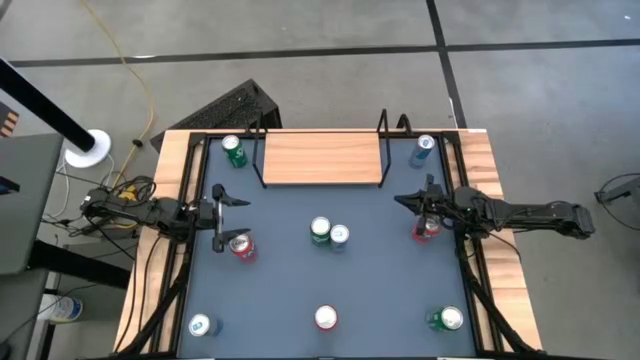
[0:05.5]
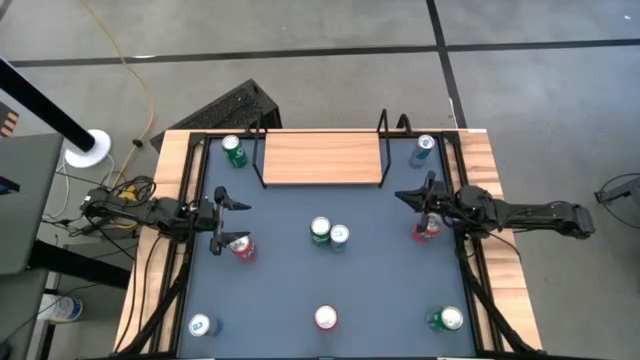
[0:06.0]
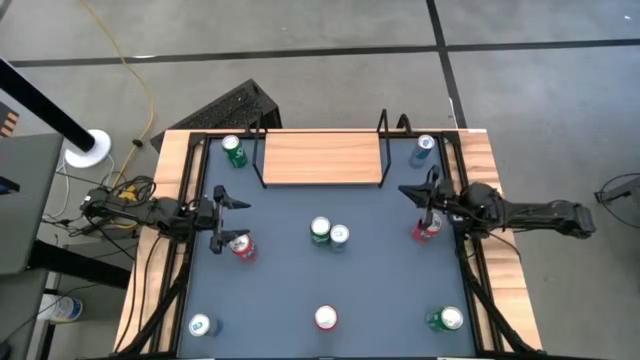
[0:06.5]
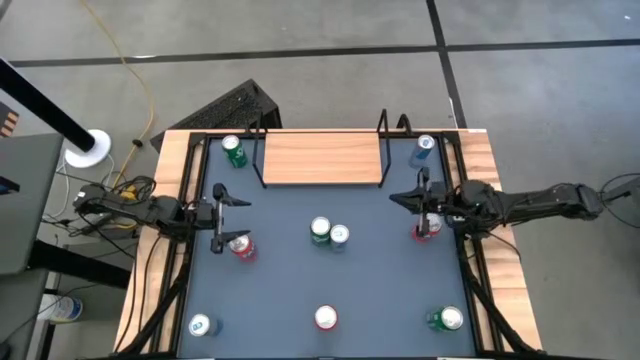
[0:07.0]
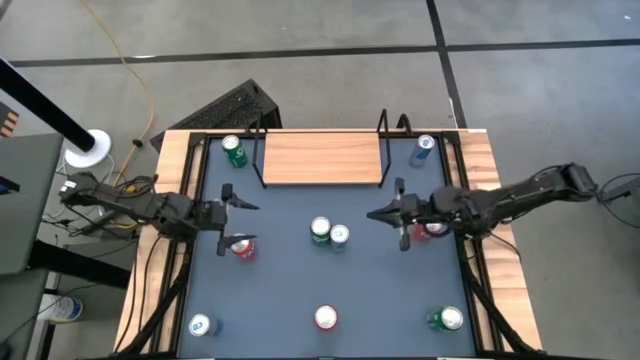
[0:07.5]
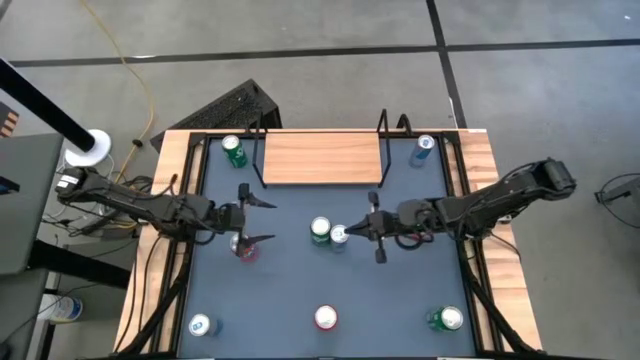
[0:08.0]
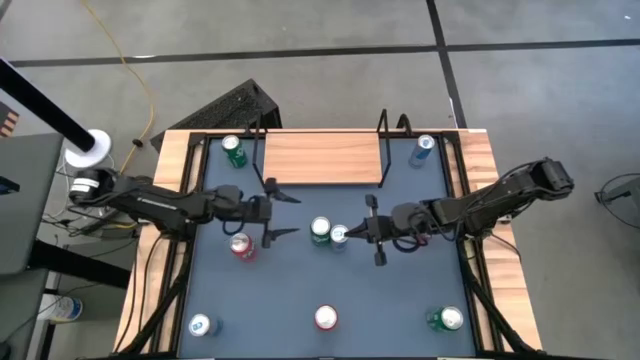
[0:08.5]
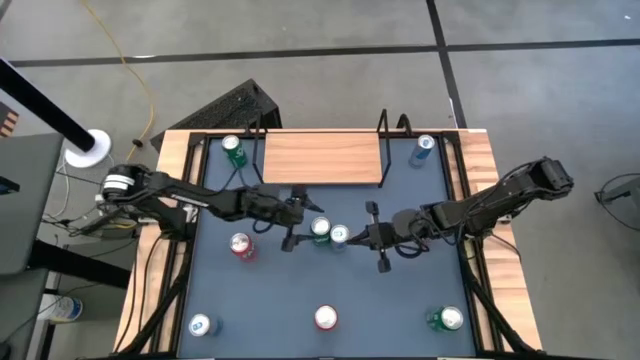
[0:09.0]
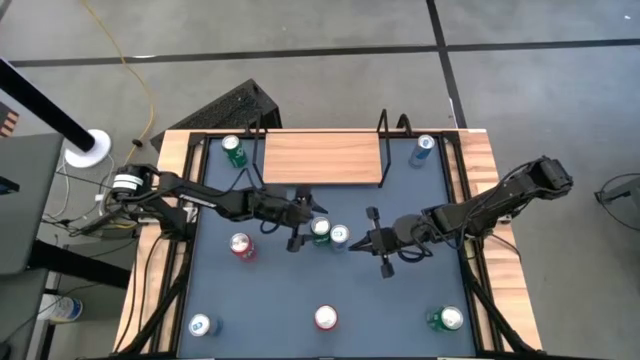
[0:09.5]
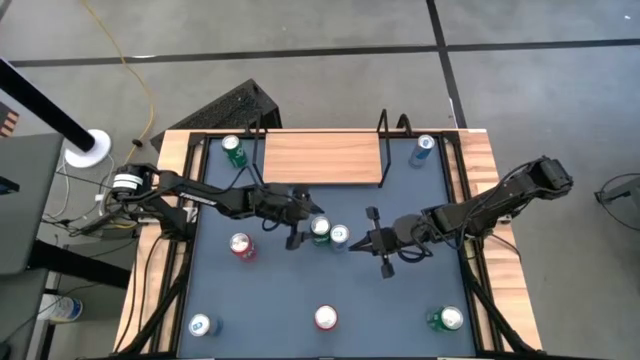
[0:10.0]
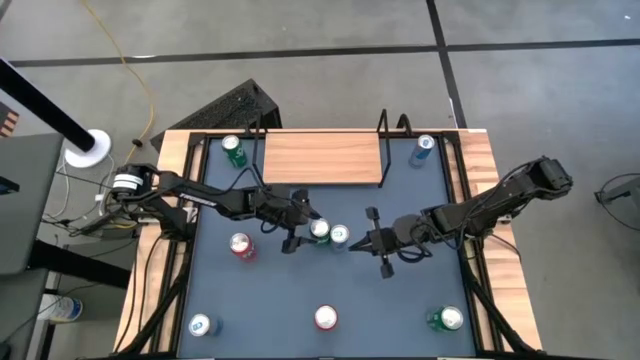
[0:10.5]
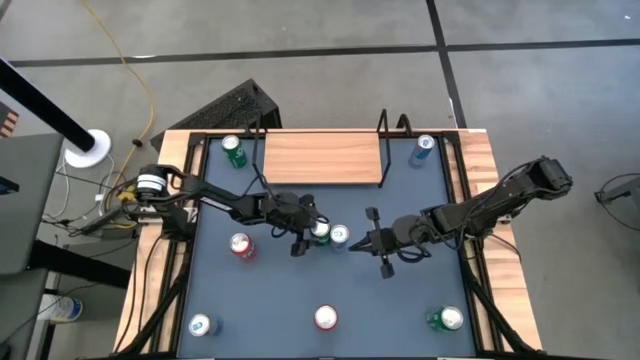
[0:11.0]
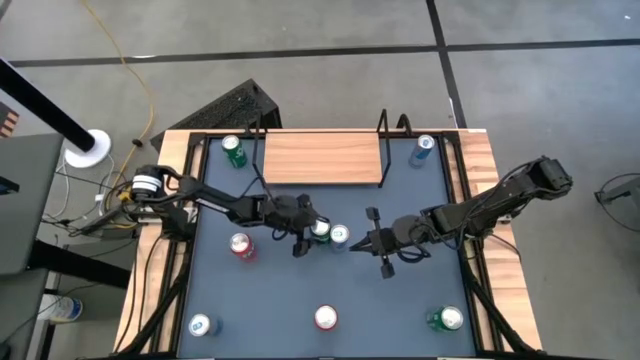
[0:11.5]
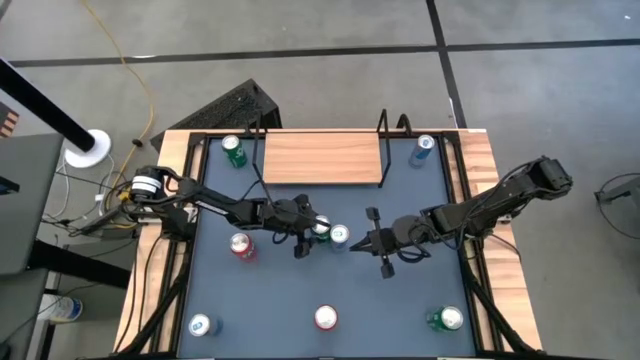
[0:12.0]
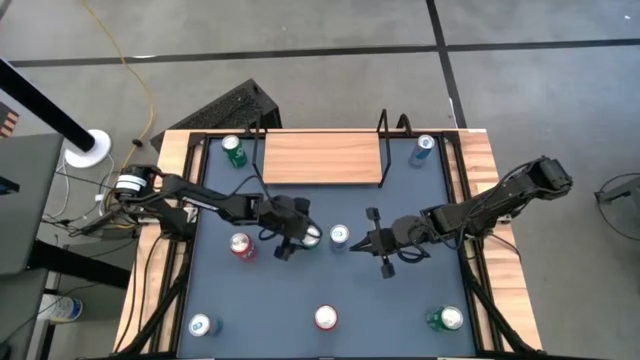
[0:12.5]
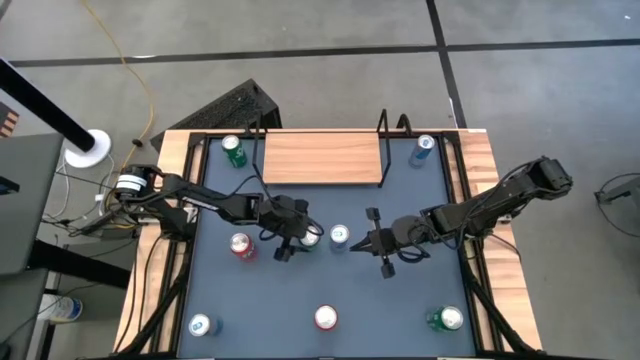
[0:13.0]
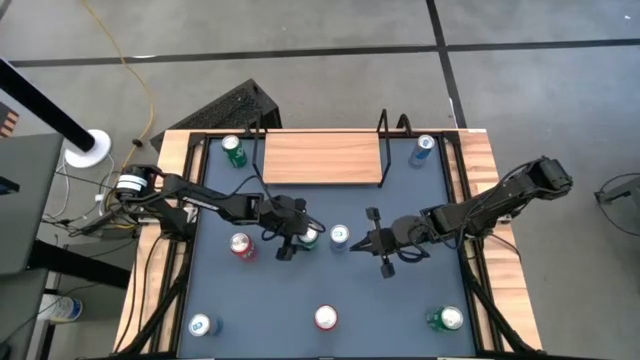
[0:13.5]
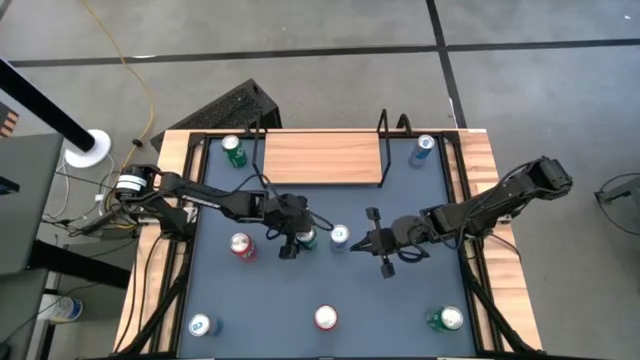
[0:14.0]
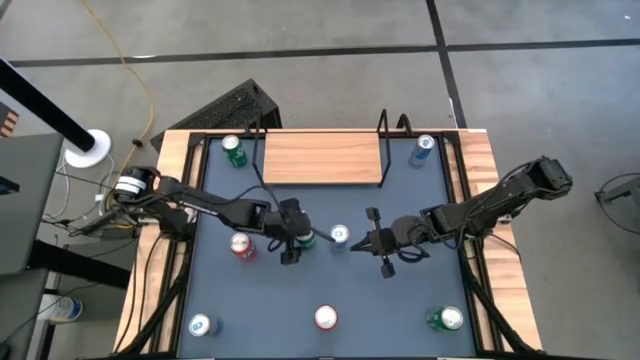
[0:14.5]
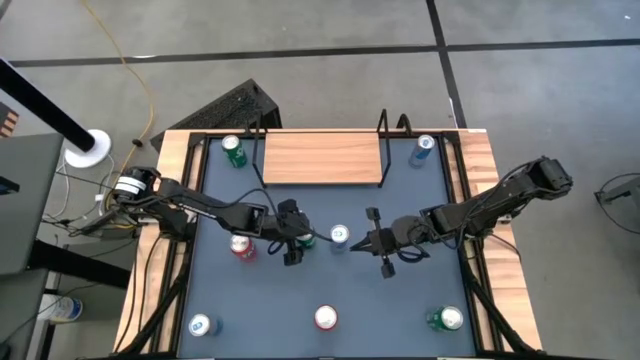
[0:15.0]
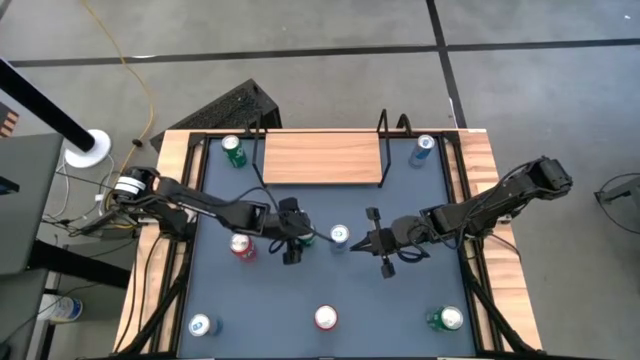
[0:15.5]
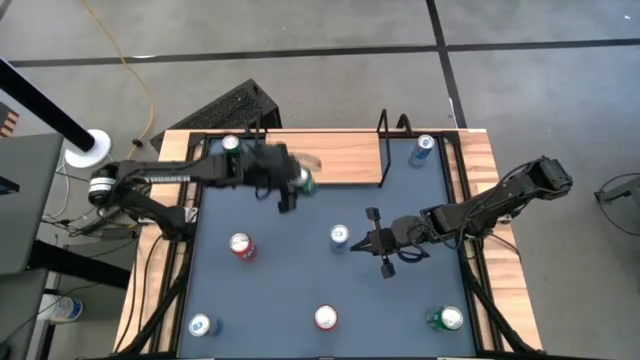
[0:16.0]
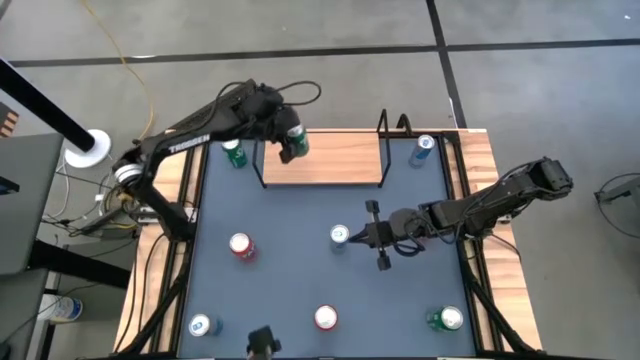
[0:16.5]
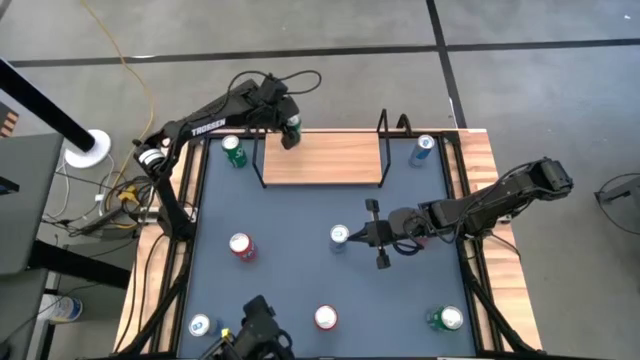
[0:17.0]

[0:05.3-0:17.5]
Task: Place canned beverage on shelf
Put the middle green soda can on the shelf

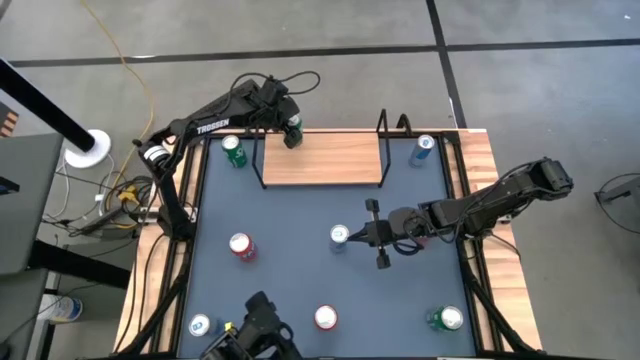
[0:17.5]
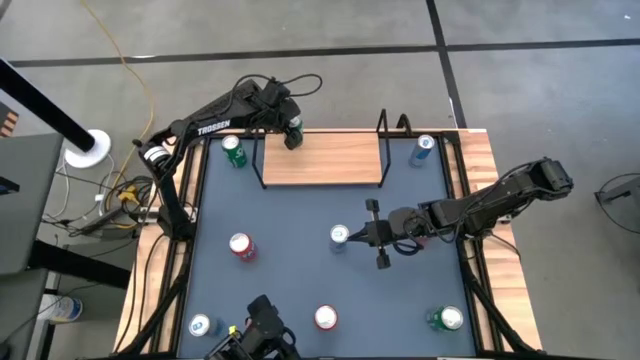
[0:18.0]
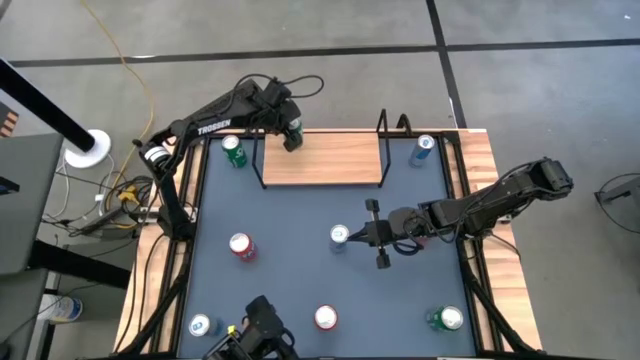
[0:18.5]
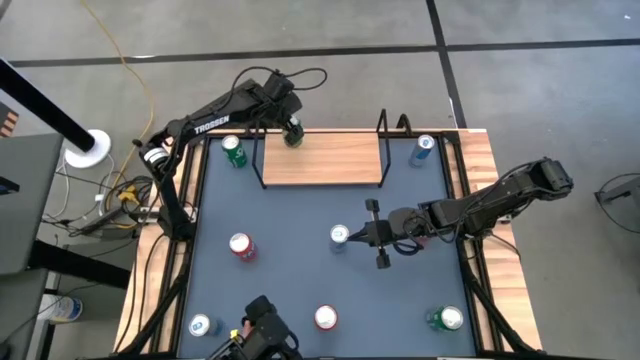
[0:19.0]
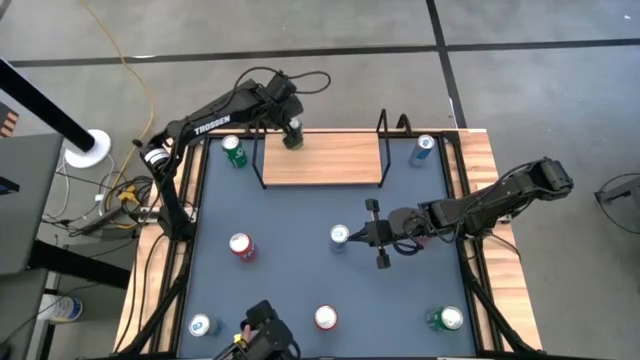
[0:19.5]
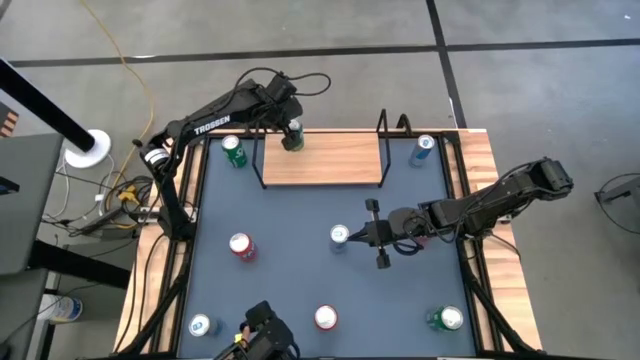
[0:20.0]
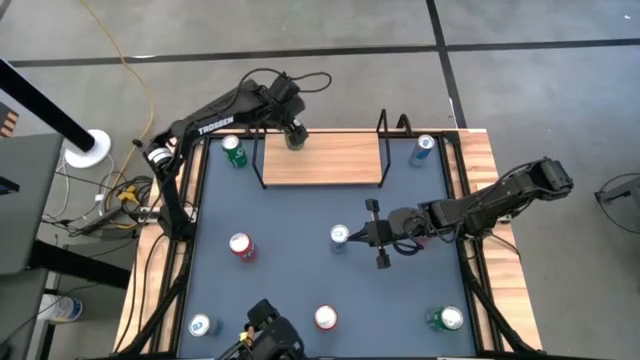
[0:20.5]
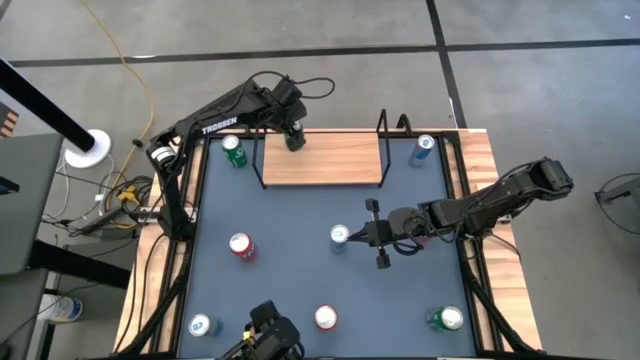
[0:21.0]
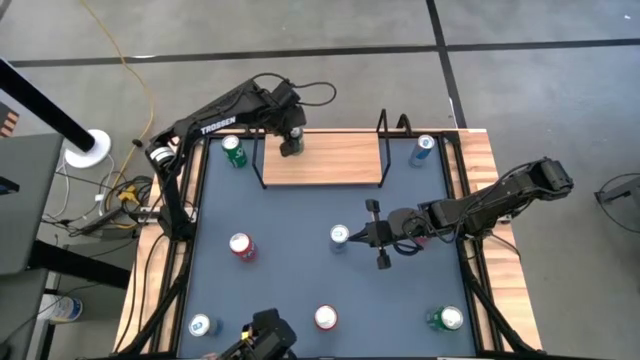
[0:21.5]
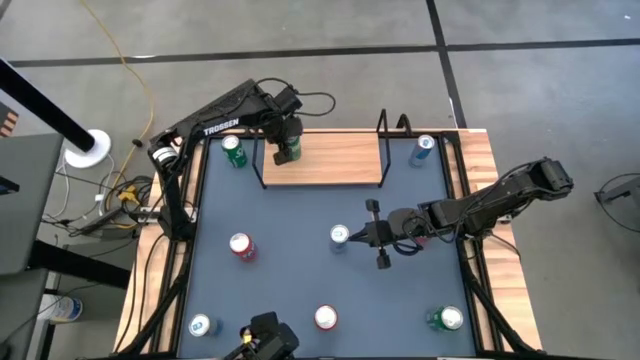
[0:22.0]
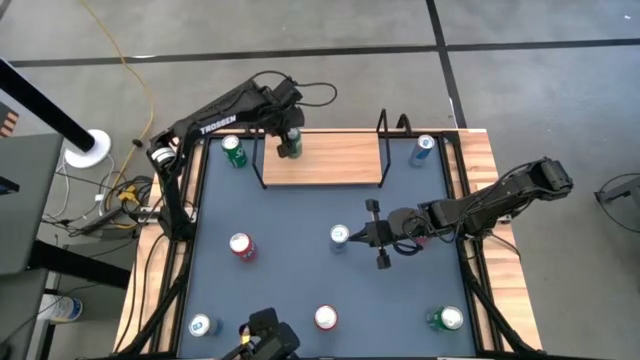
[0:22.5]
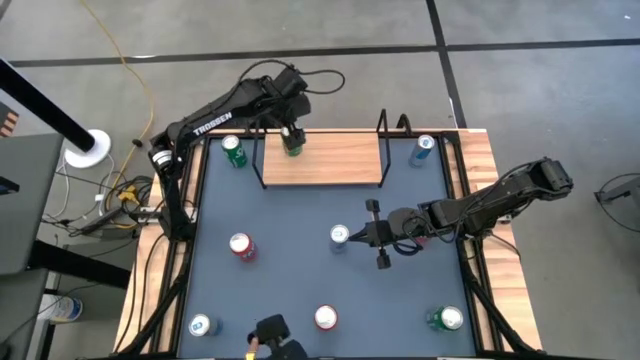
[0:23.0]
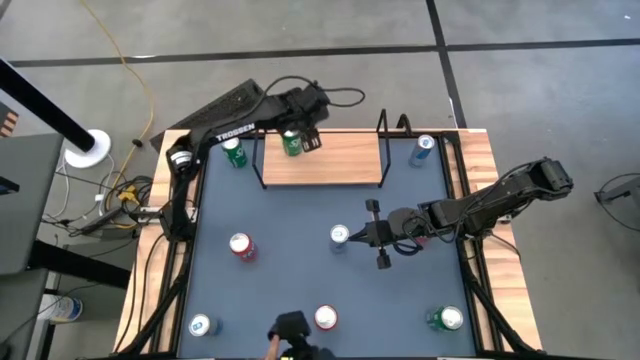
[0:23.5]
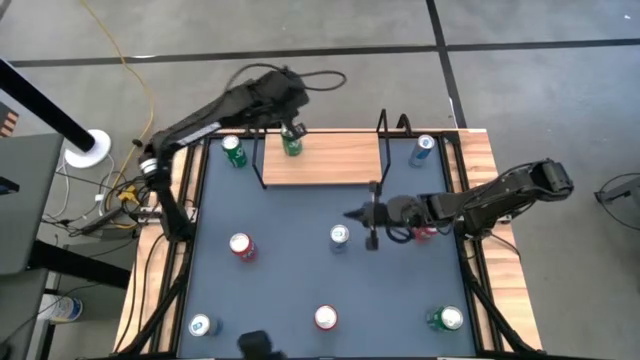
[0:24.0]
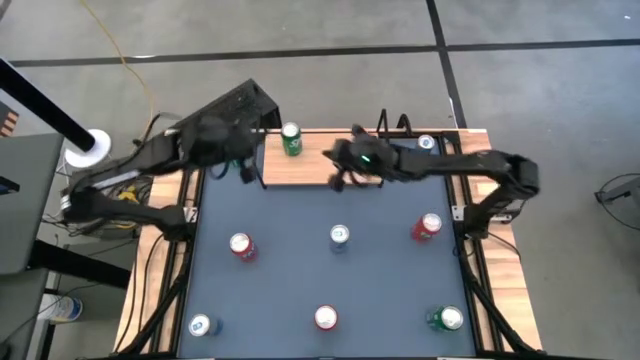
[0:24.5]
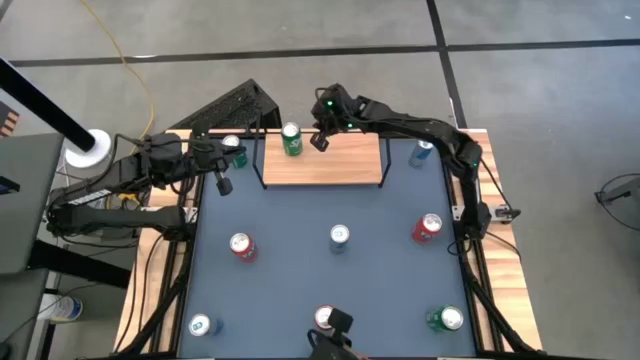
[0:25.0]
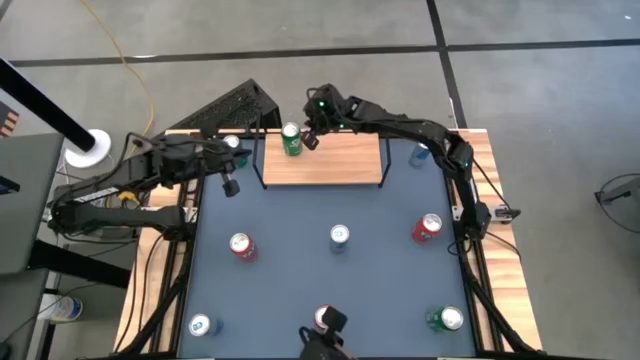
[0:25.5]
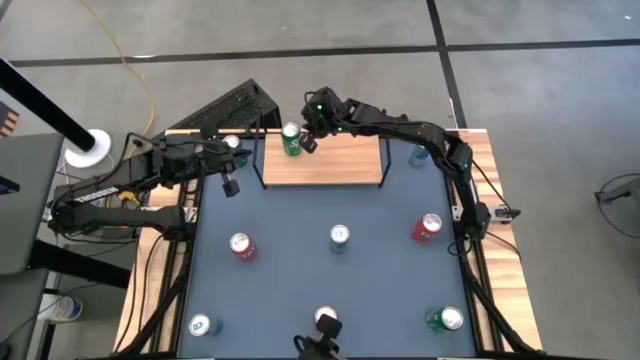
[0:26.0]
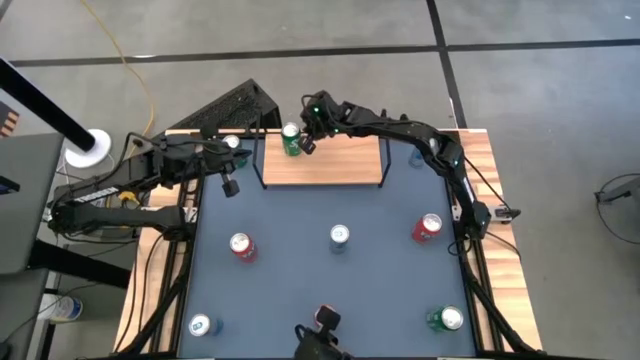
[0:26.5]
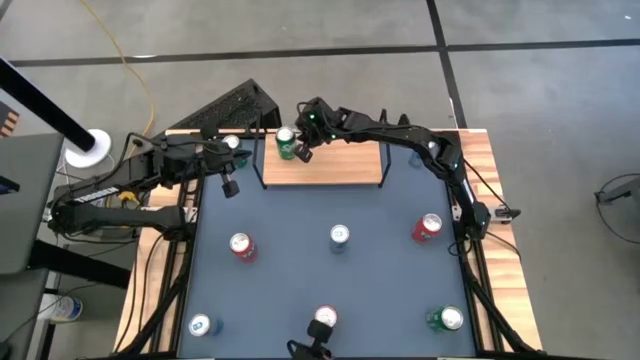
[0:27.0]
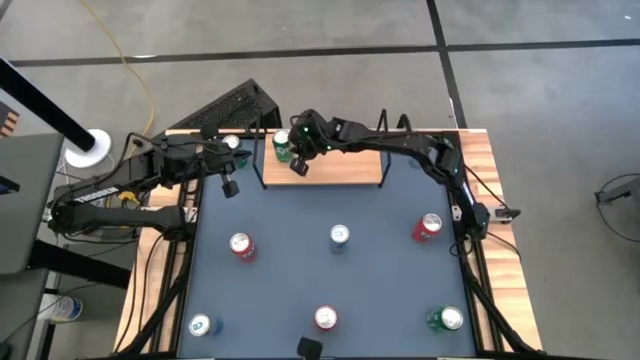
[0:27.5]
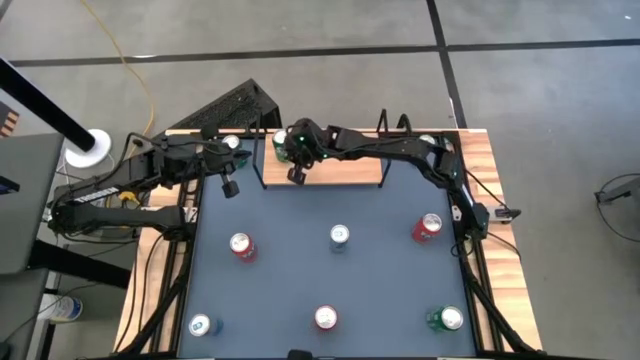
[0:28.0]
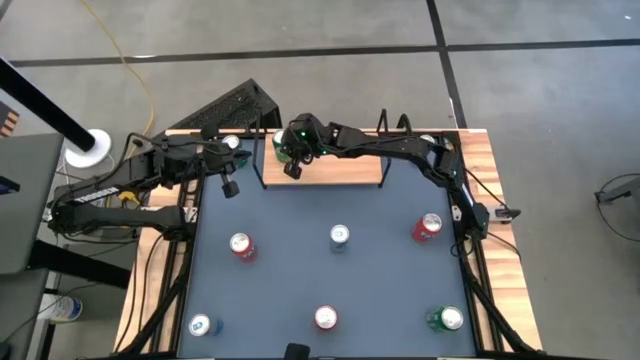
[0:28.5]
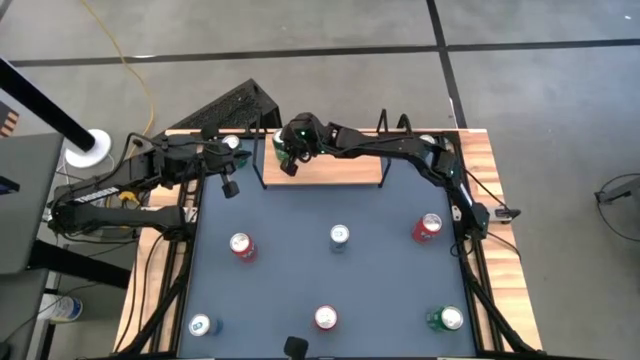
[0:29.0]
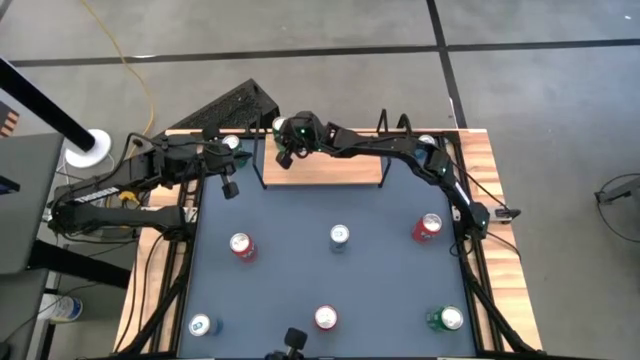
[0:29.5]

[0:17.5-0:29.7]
Put the middle green soda can on the shelf
